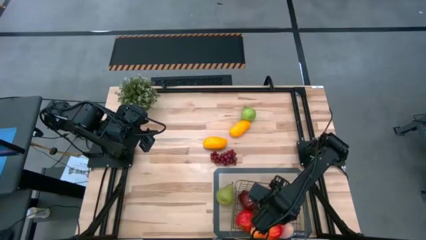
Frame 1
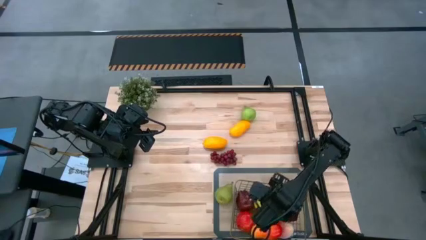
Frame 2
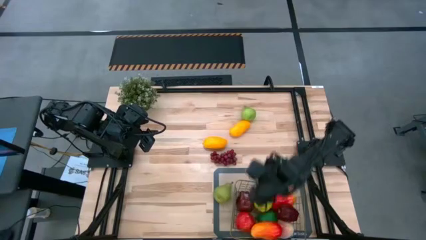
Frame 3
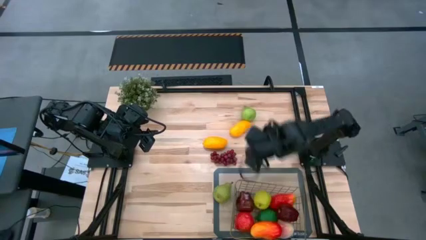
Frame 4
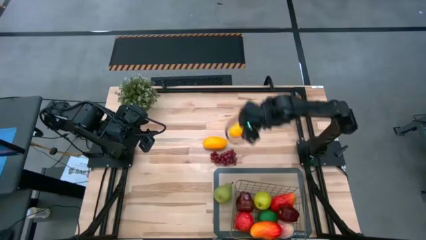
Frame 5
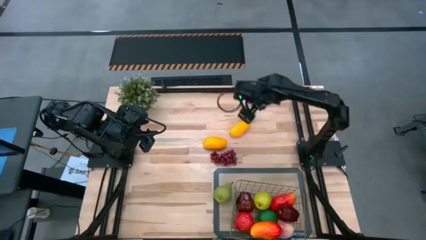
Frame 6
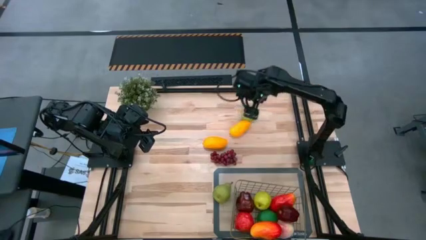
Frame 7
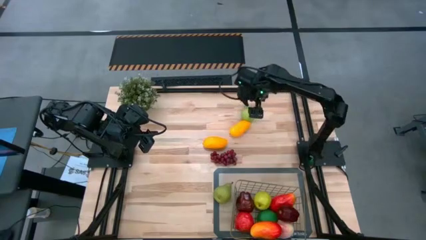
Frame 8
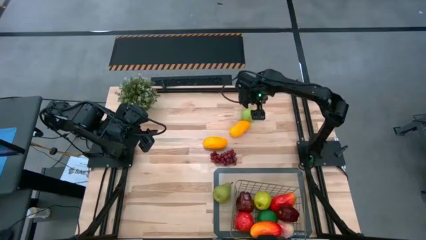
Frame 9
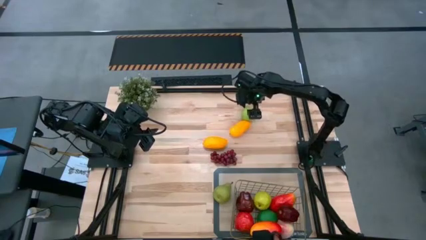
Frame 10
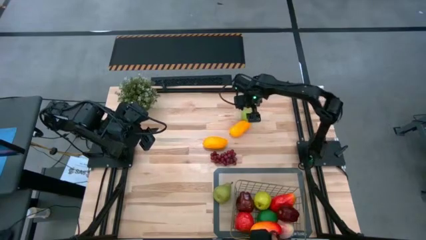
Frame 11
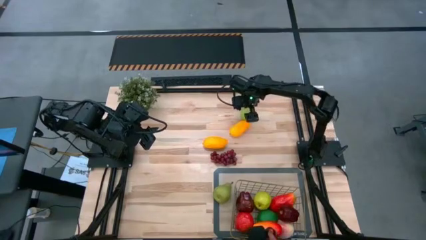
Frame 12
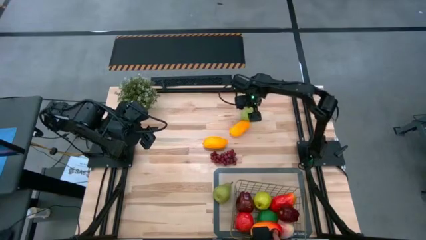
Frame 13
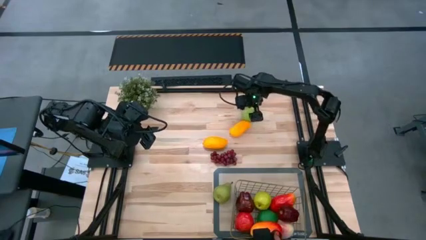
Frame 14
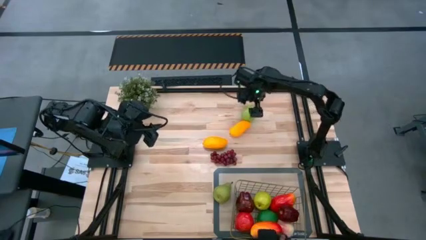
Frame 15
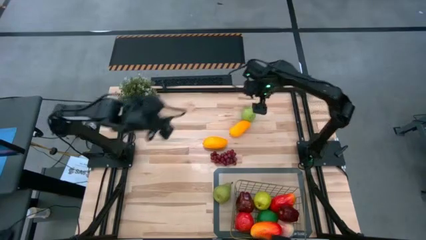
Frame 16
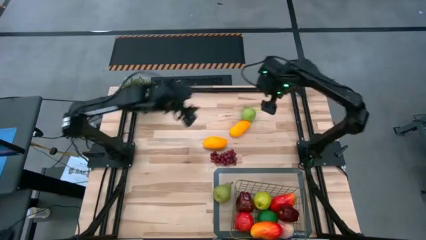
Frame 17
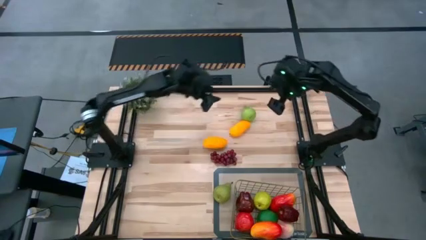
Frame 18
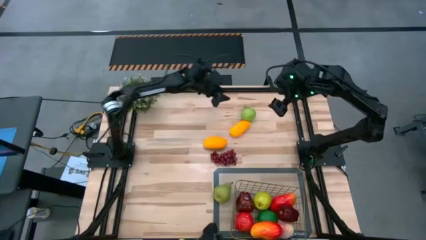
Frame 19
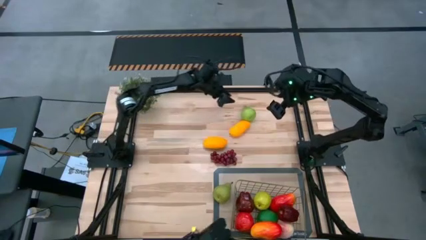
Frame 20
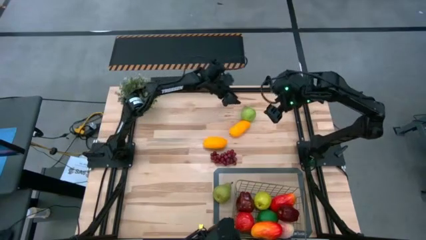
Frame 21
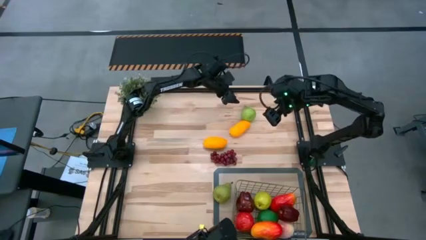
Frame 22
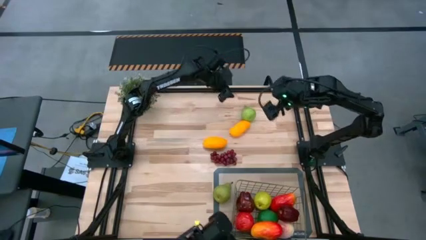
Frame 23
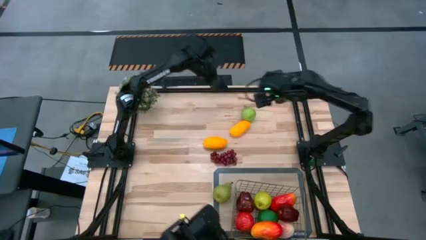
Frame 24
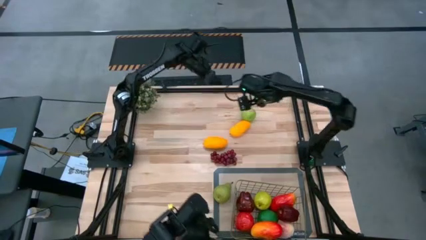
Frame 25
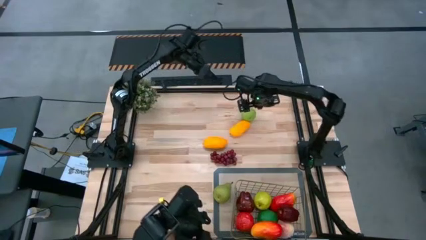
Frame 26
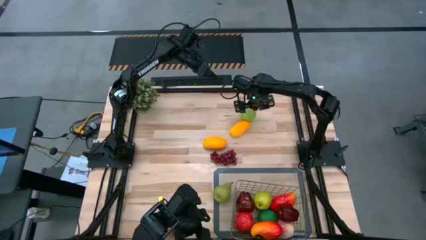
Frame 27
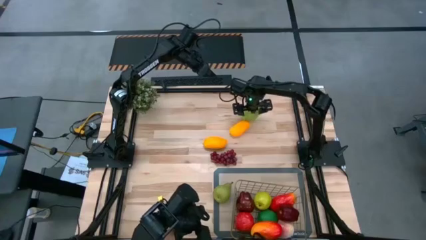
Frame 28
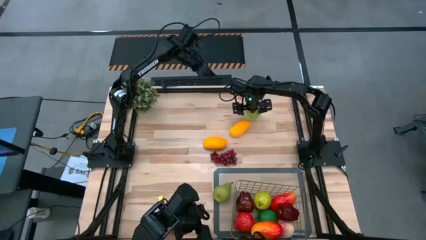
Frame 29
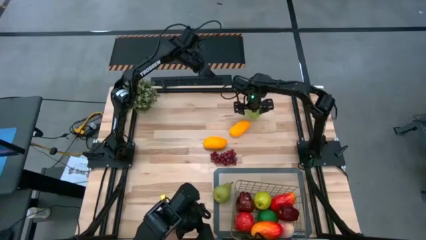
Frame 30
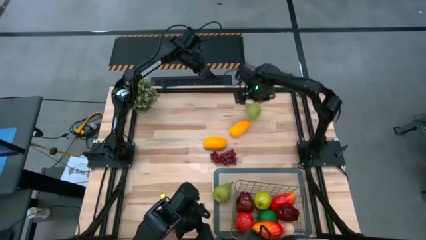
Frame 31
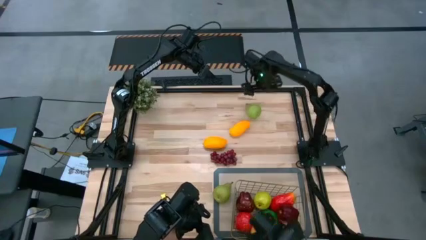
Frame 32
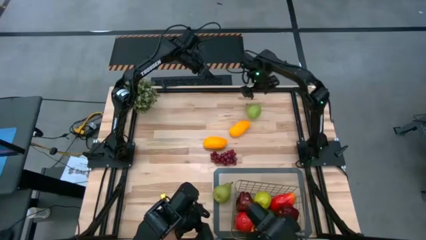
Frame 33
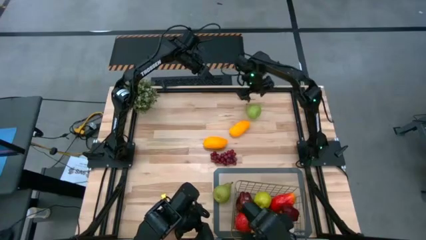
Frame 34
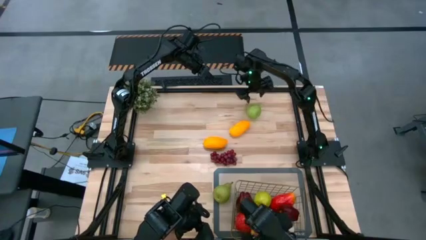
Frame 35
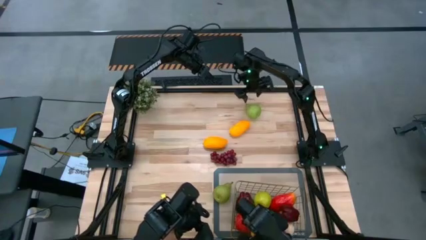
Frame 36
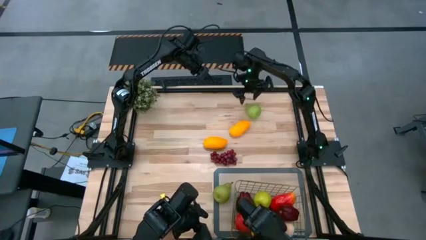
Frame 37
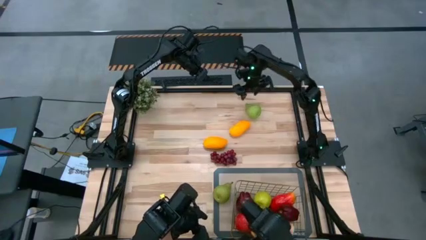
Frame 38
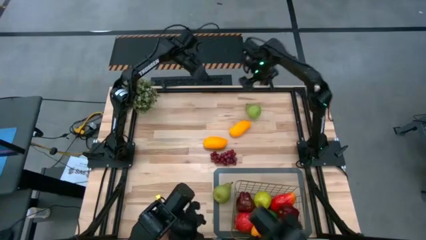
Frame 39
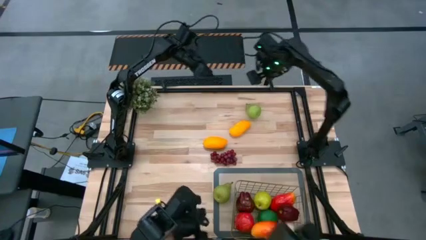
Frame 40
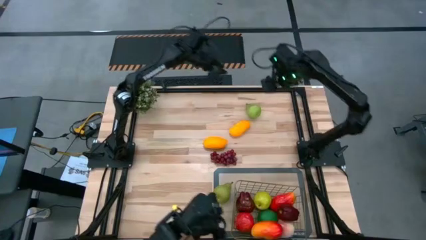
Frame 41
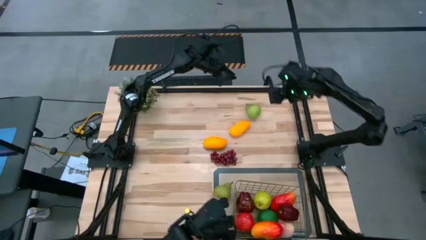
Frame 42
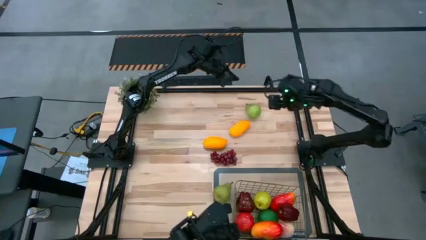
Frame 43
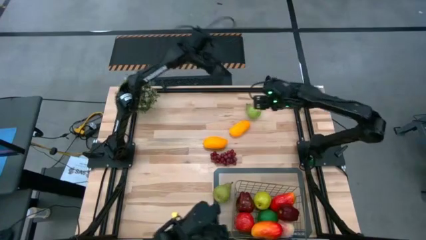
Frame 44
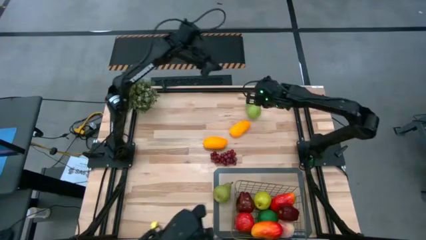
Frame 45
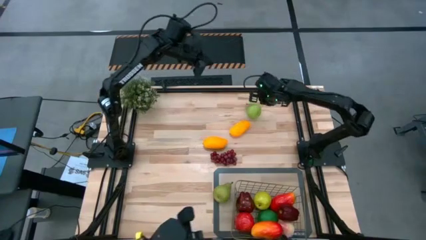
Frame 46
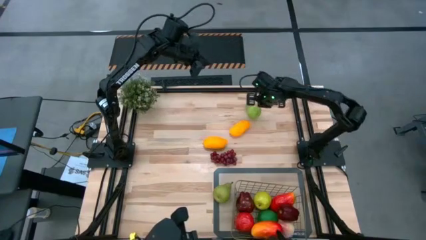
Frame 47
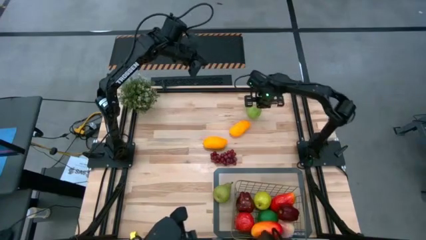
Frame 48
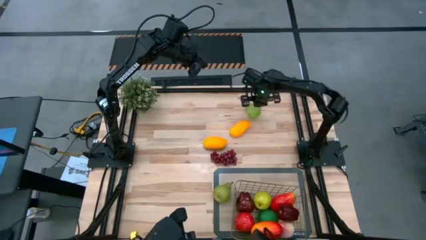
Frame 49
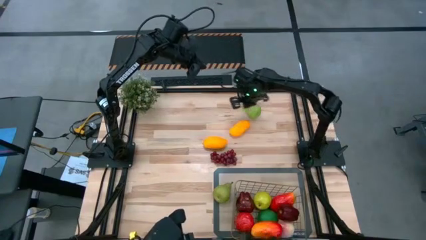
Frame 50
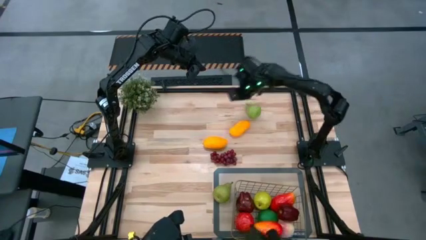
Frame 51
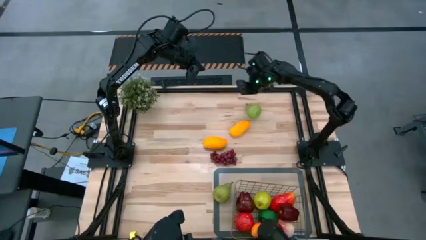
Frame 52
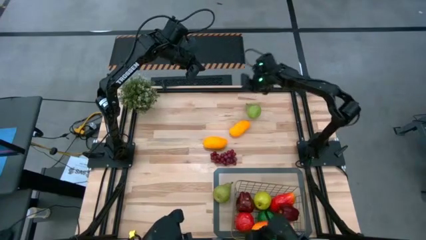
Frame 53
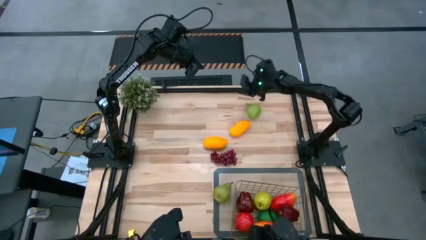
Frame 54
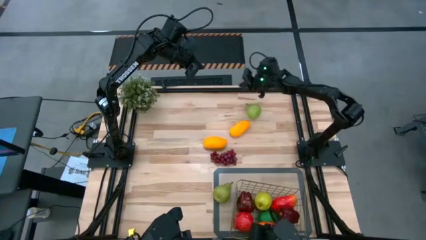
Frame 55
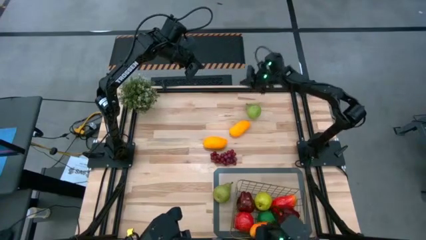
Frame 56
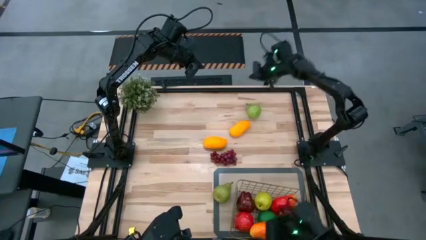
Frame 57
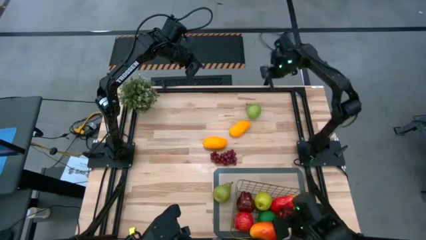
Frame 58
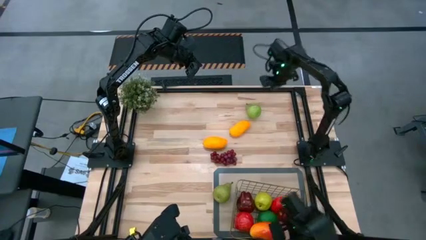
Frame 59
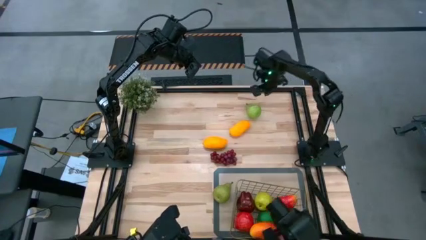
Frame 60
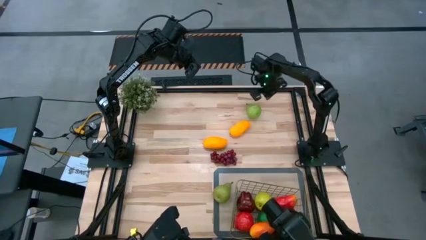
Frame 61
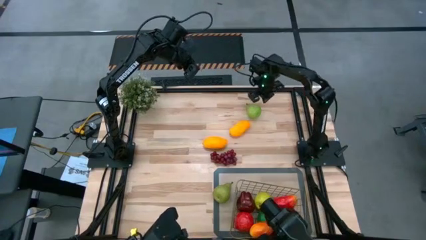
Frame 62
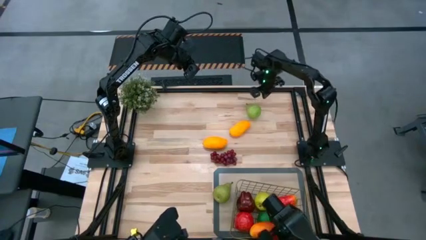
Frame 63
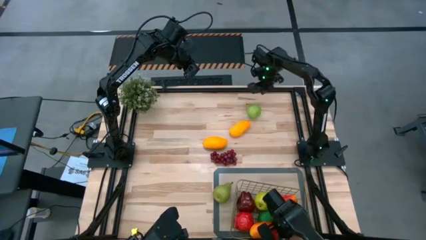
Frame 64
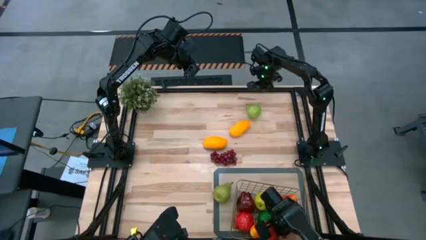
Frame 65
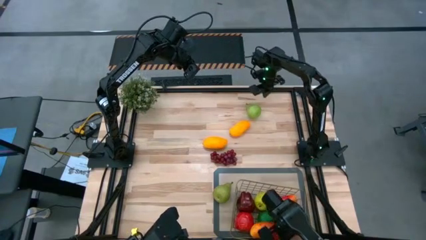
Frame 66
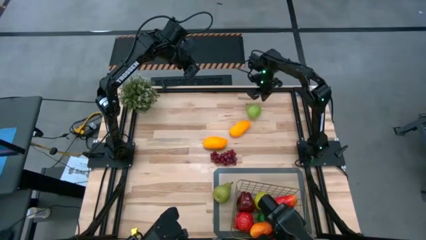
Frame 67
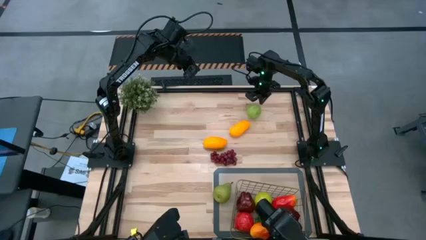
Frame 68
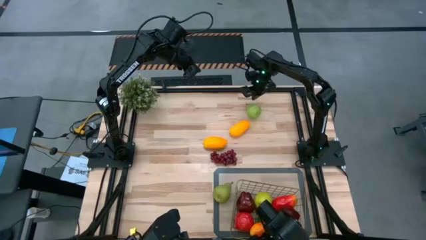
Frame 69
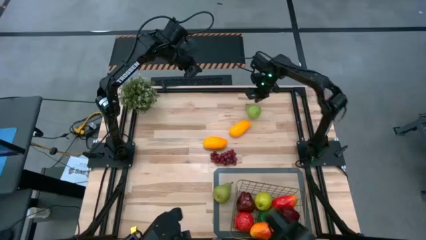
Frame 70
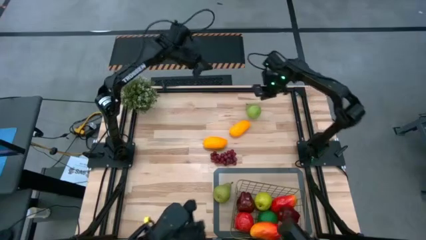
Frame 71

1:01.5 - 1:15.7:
Task: Build produce basket
Put the top pear into the wire basket

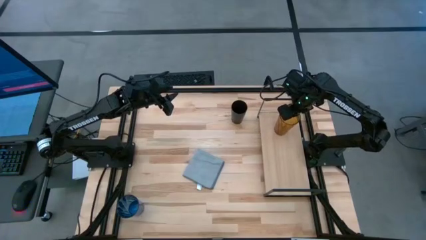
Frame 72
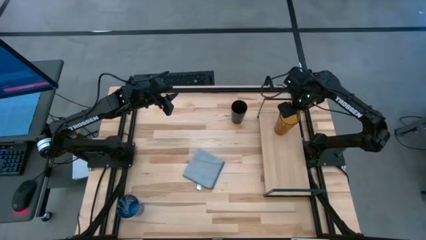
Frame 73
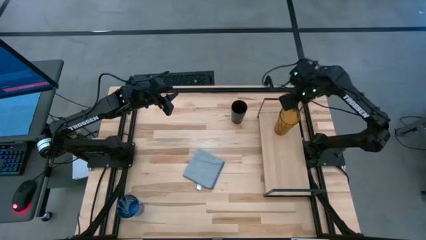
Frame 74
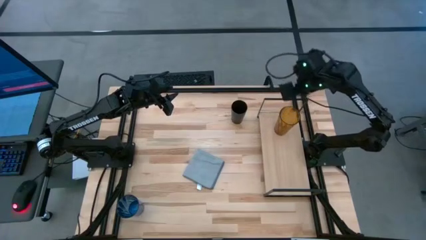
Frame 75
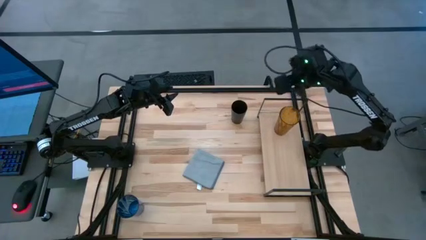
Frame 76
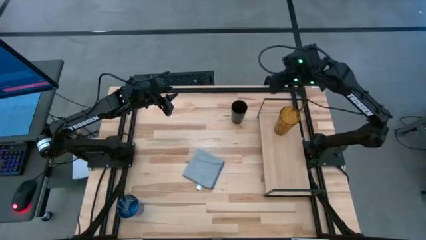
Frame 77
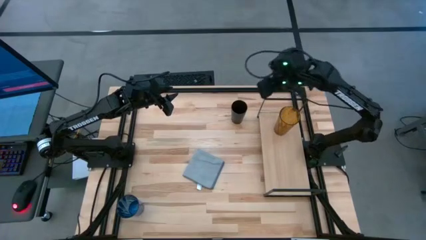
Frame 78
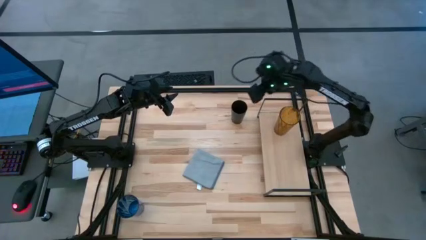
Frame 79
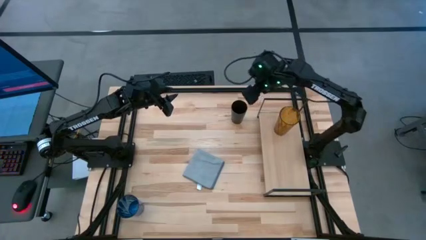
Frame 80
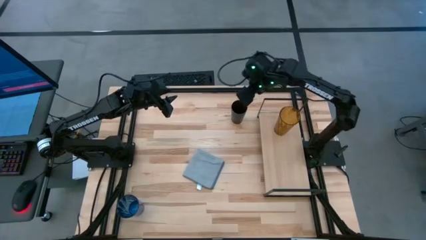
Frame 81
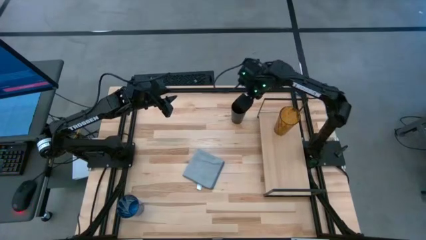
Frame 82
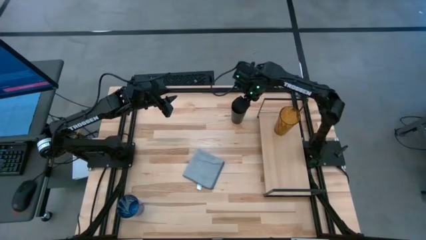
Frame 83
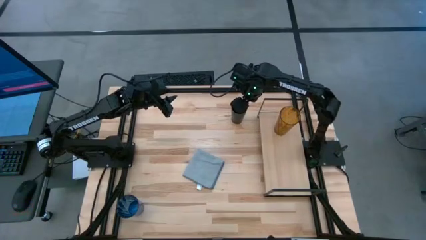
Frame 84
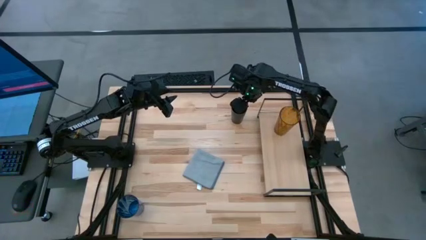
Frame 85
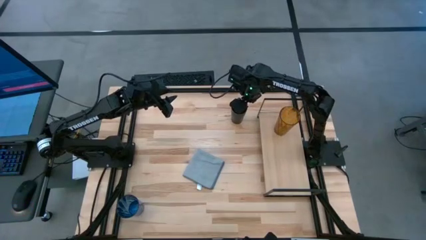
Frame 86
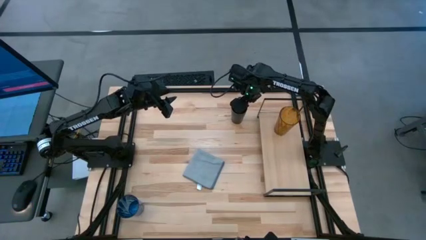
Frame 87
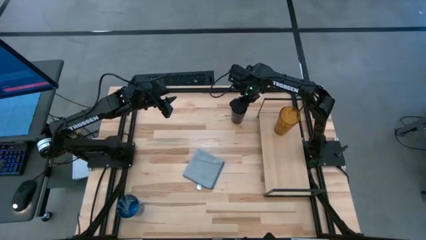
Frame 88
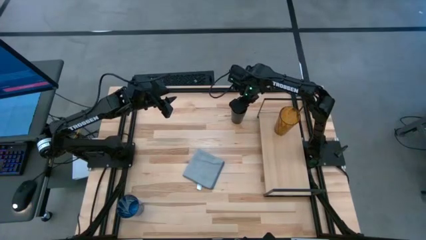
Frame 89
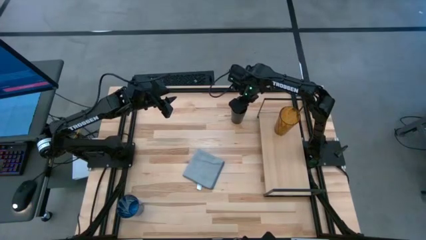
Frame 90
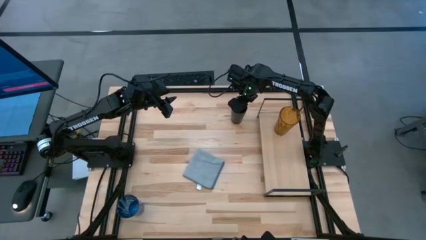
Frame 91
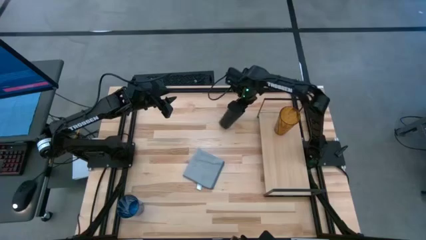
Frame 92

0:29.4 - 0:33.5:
Task: Stack small to large cups/mugs on shelf
Put the black cup on the shelf
